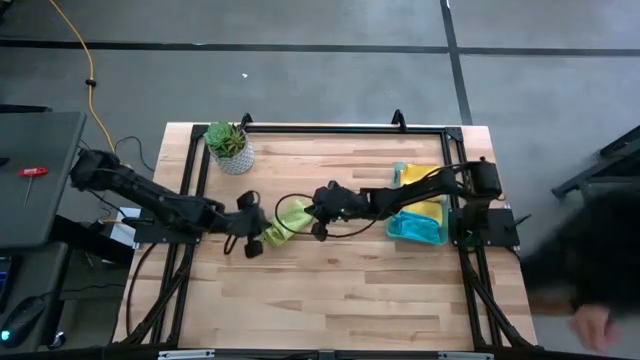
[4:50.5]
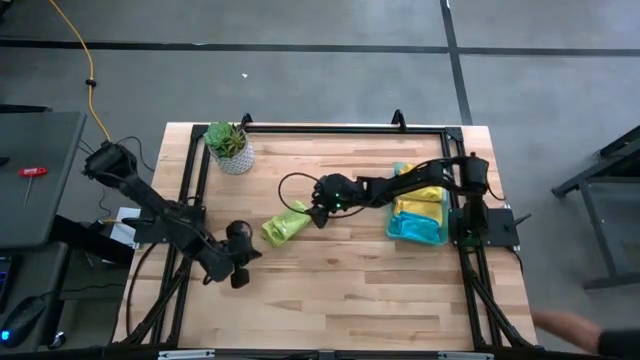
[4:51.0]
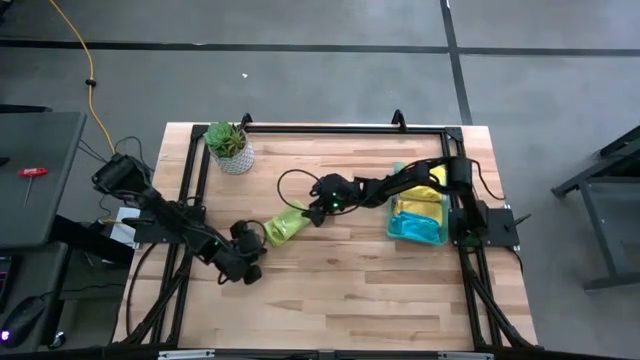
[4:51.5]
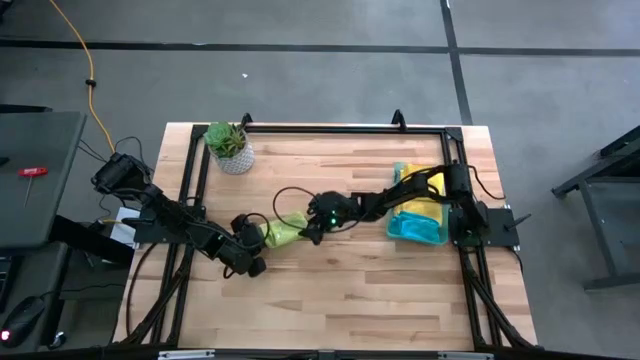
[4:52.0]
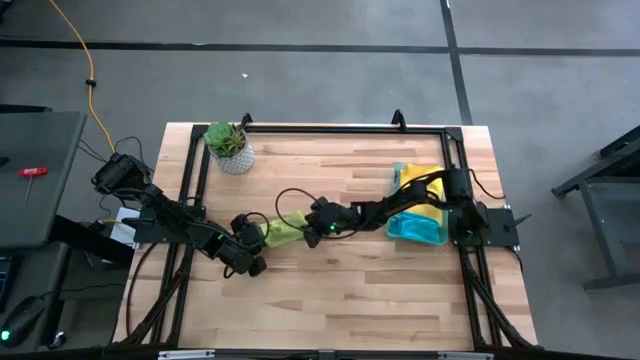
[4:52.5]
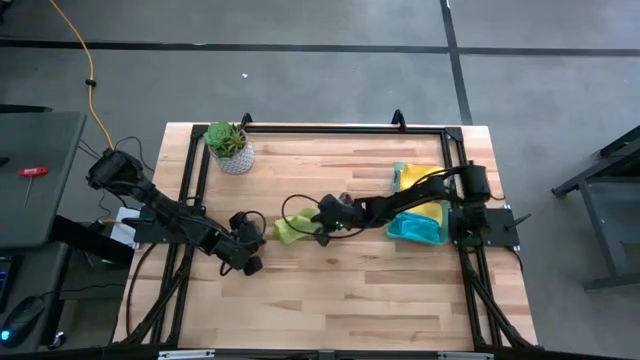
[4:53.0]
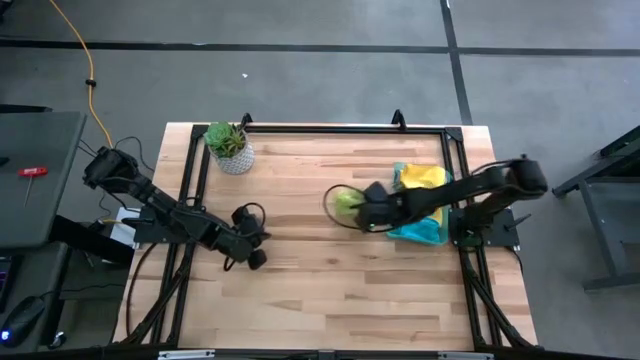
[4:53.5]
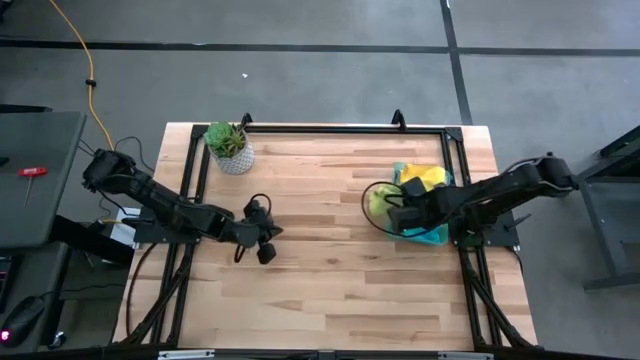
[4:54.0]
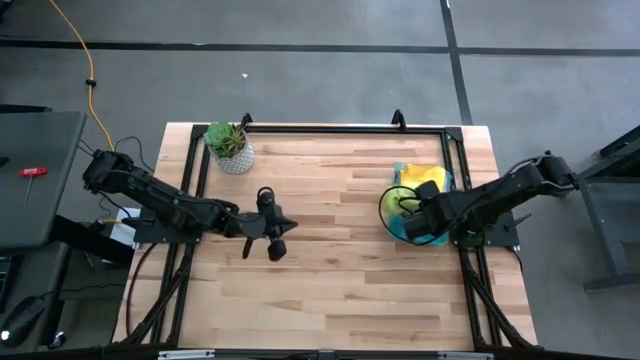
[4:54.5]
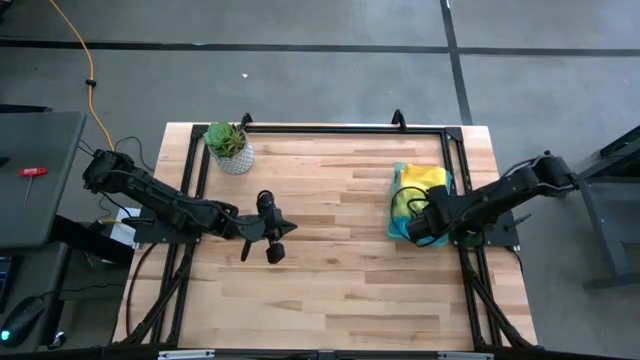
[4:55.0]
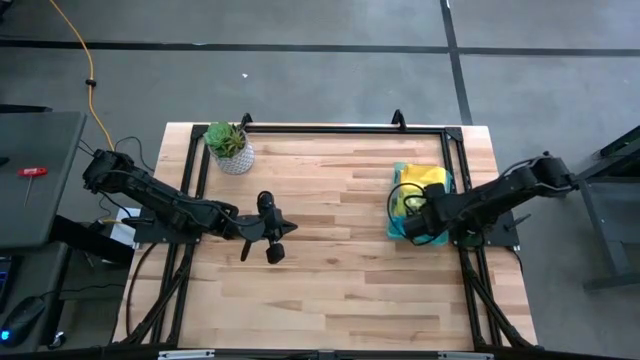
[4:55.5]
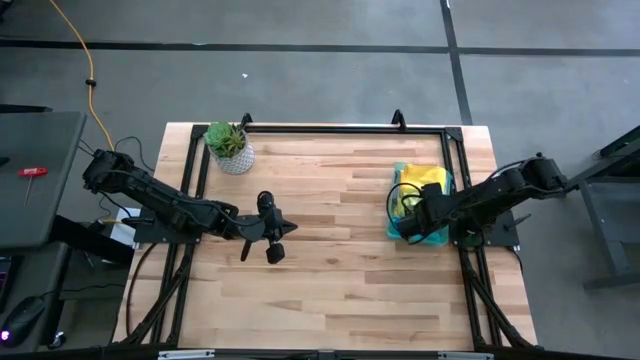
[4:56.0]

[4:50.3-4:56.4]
Task: Fold microfiber towels
Put the green microfiber cloth into the blue bin

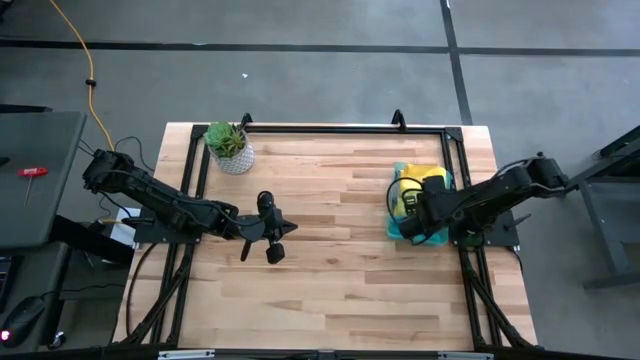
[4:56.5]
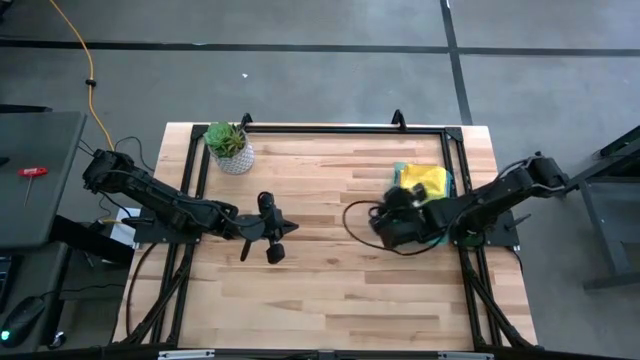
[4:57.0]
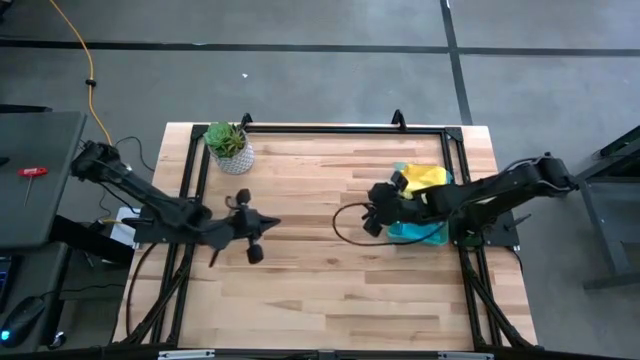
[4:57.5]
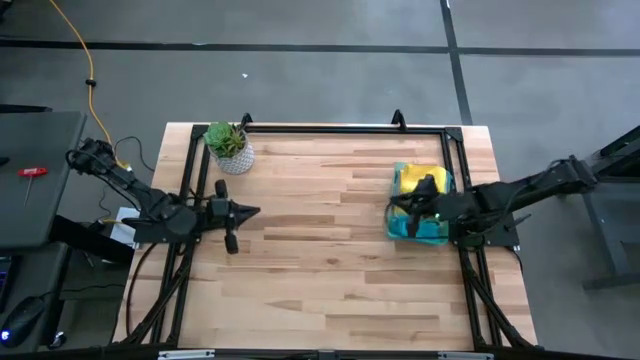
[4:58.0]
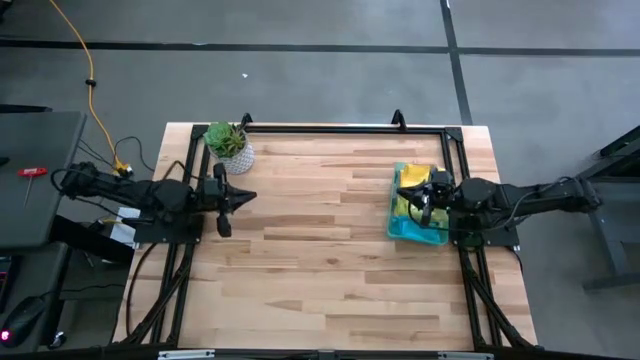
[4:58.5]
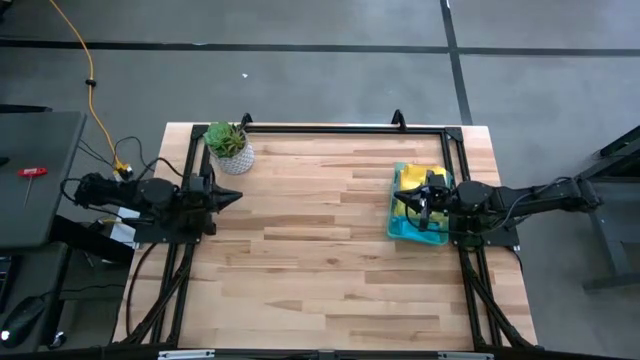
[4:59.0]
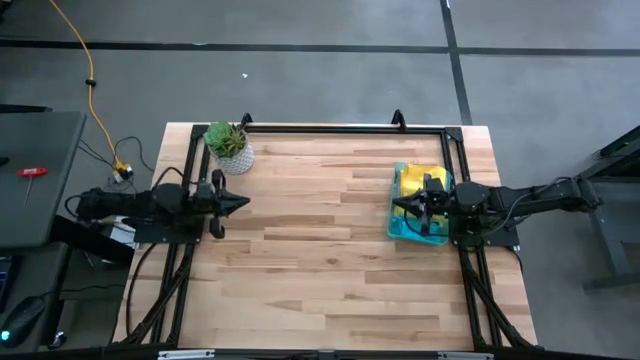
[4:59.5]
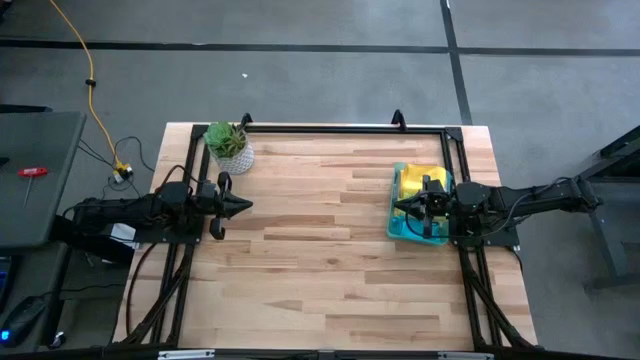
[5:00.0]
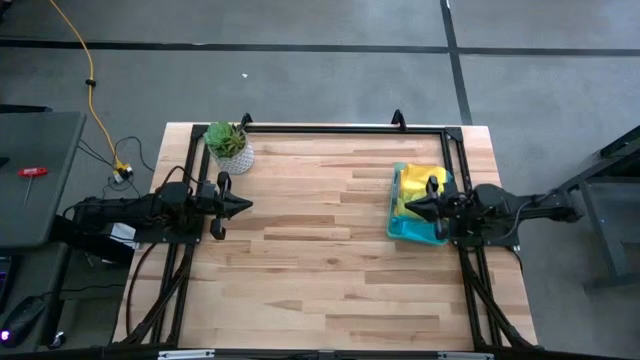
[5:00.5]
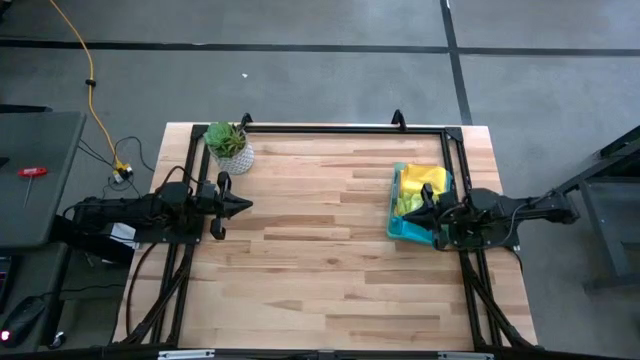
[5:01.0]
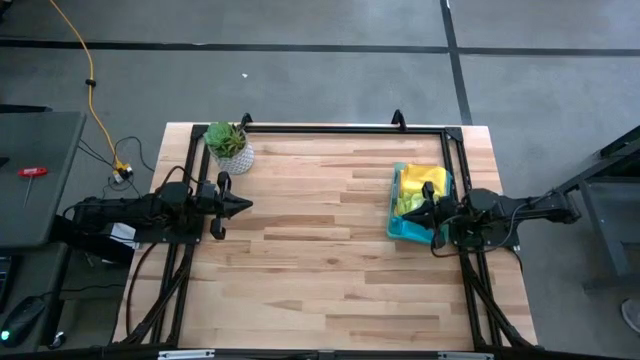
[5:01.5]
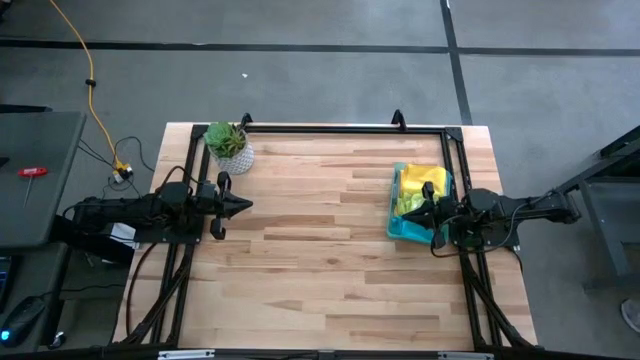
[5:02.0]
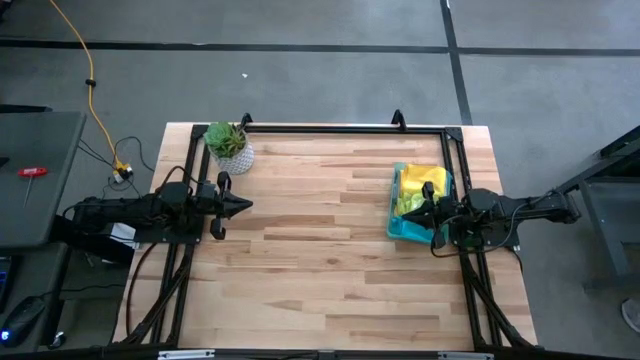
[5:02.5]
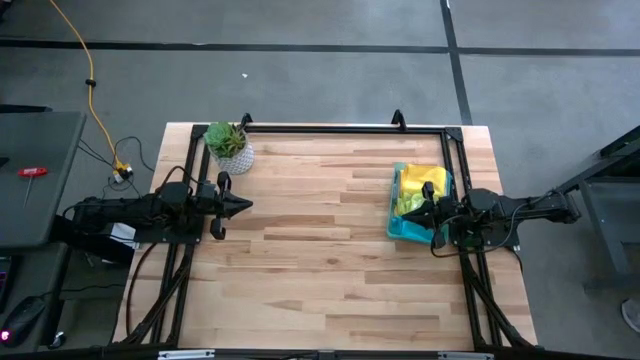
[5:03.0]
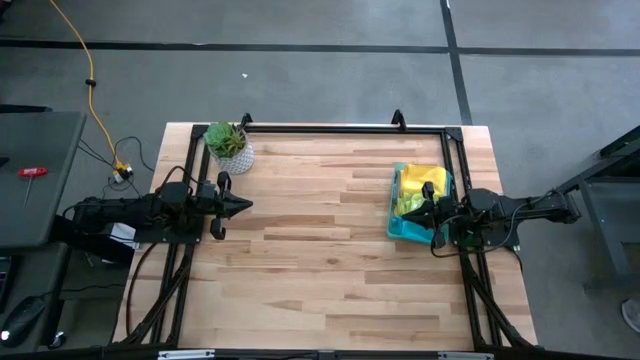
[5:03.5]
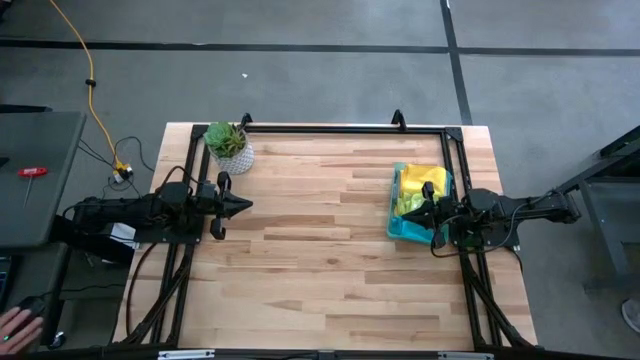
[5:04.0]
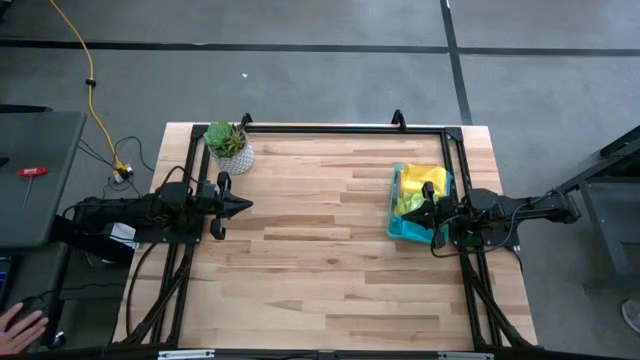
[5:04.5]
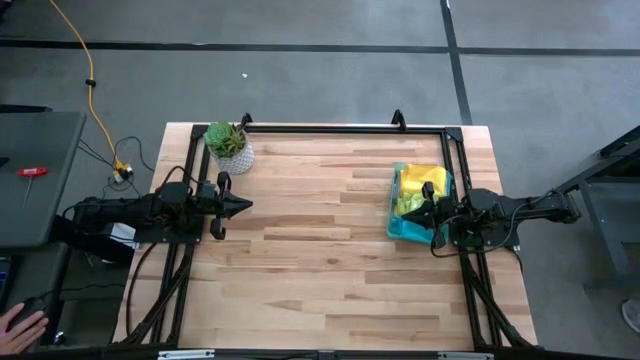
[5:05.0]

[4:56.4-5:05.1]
Return to Home Position

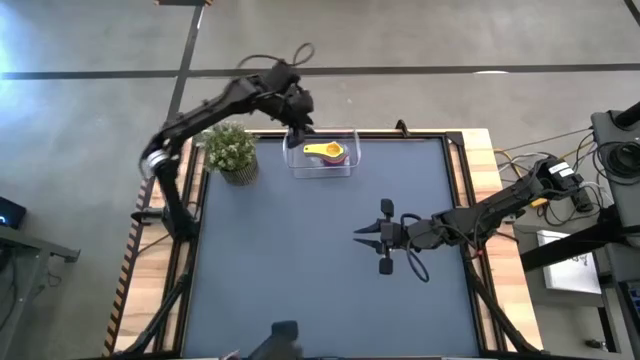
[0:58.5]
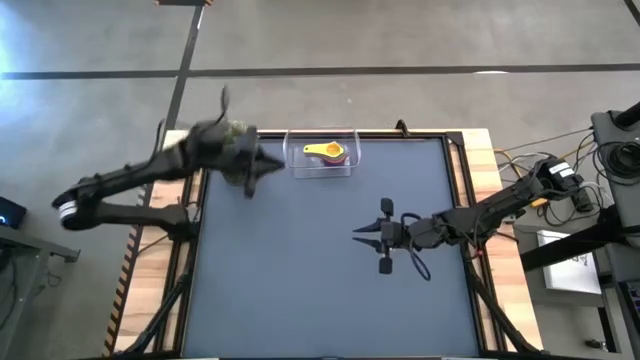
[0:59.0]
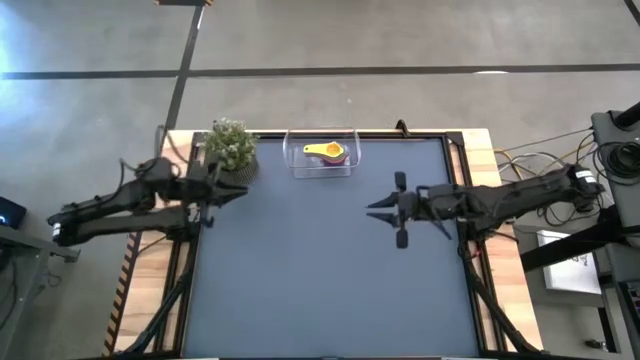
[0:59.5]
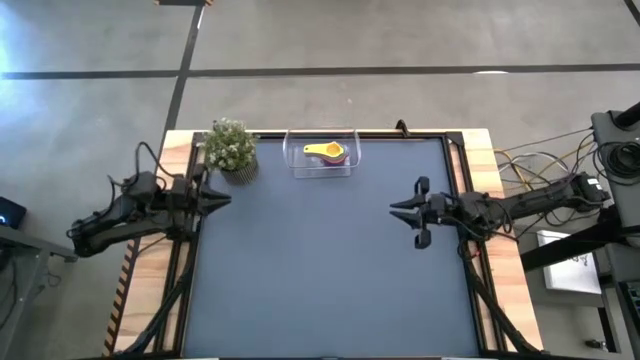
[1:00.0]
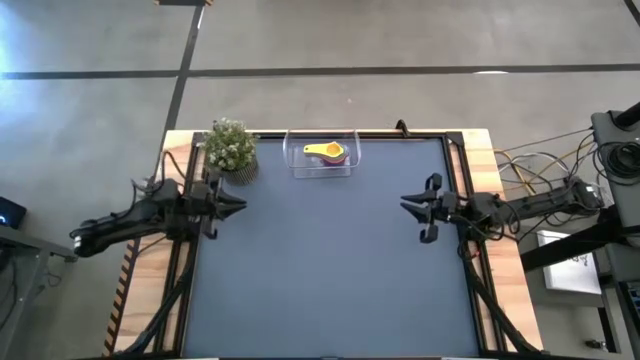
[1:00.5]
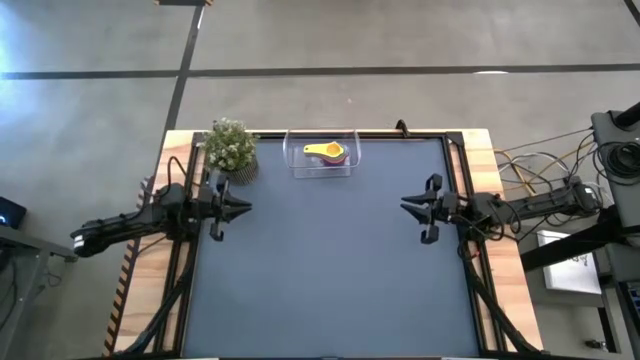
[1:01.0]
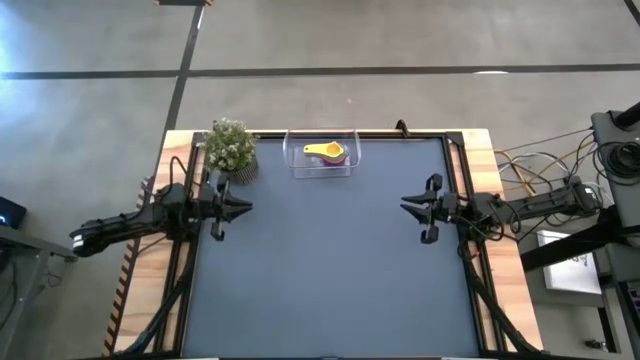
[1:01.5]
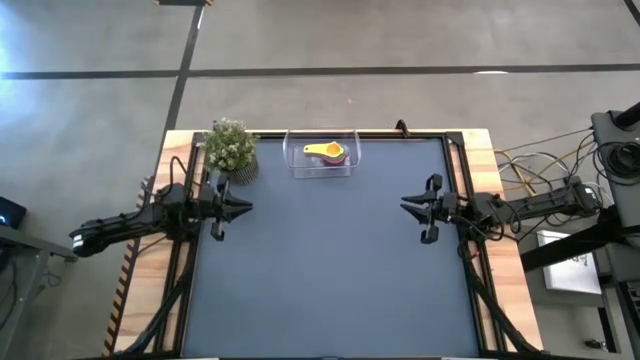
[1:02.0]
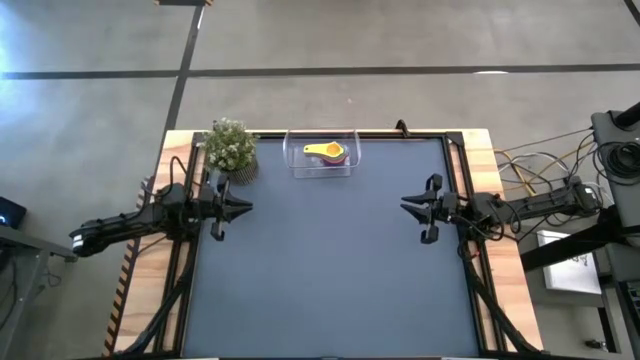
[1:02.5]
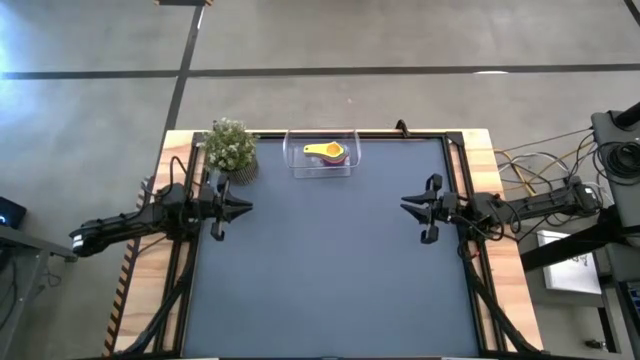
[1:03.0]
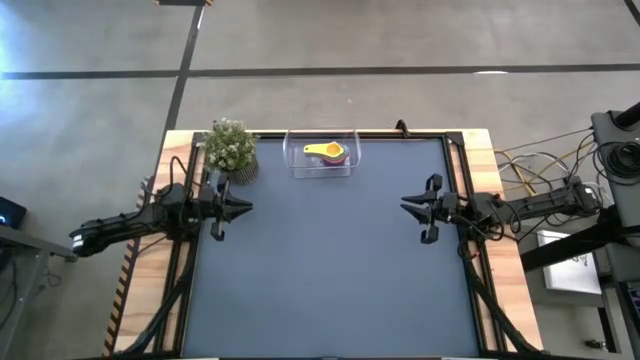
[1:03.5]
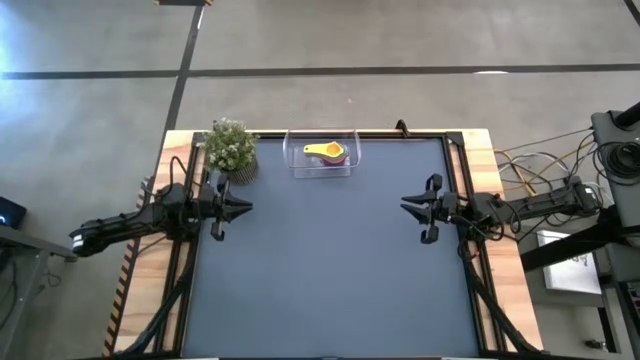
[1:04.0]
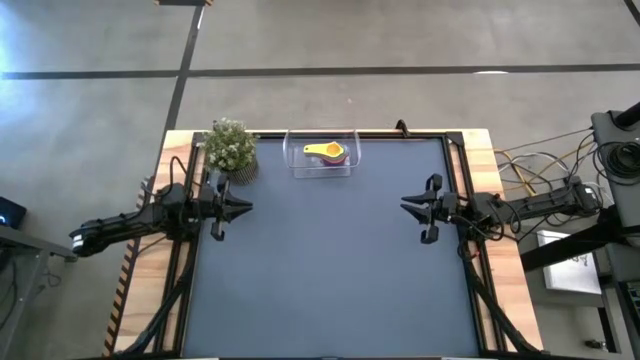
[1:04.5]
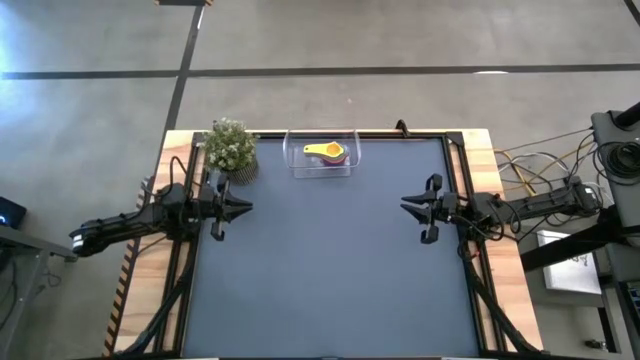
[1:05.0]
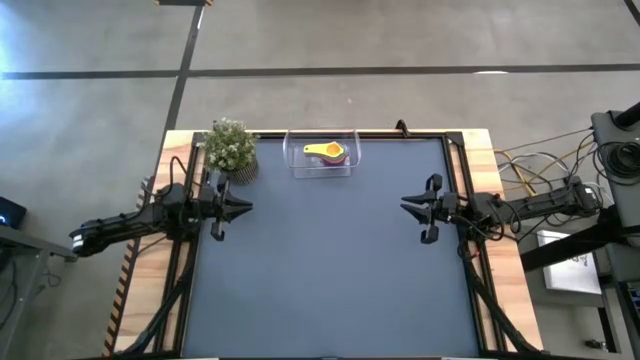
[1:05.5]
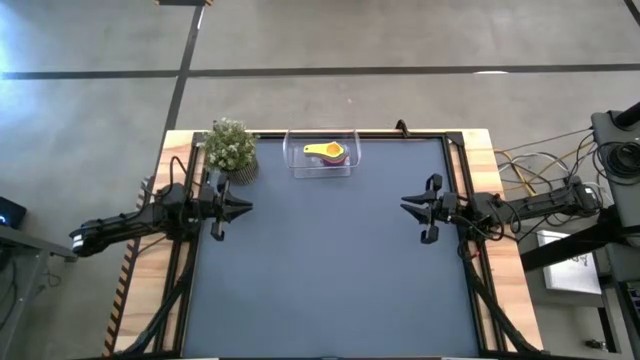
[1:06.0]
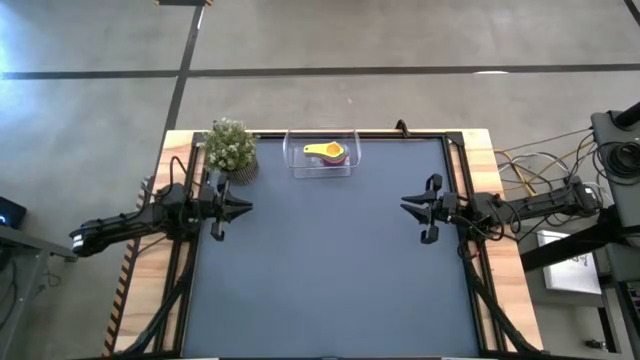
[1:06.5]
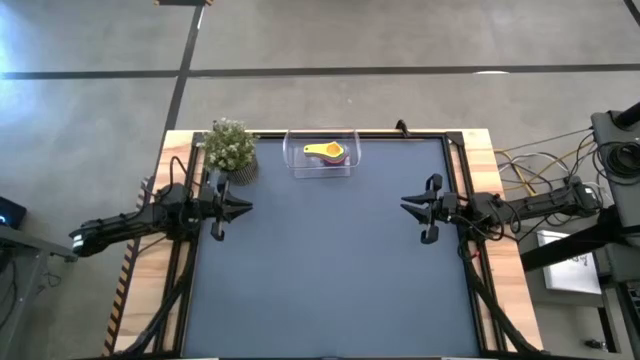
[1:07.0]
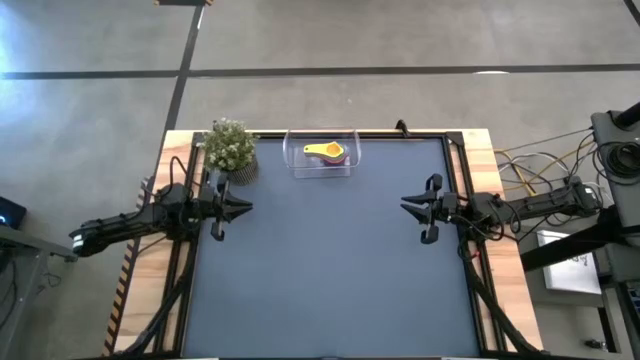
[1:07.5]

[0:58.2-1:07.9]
Task: Nest measuring cups in basket
Return to Home Position
